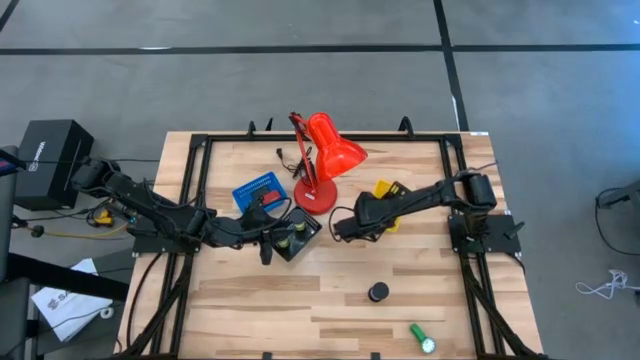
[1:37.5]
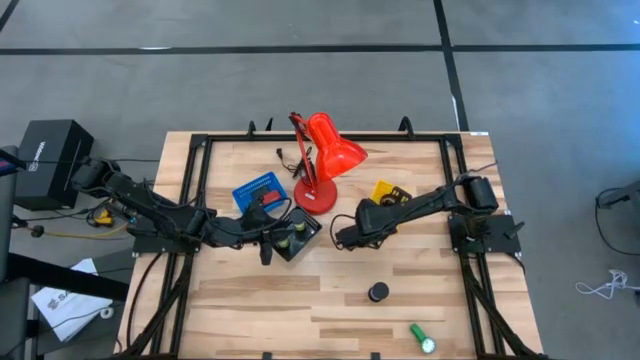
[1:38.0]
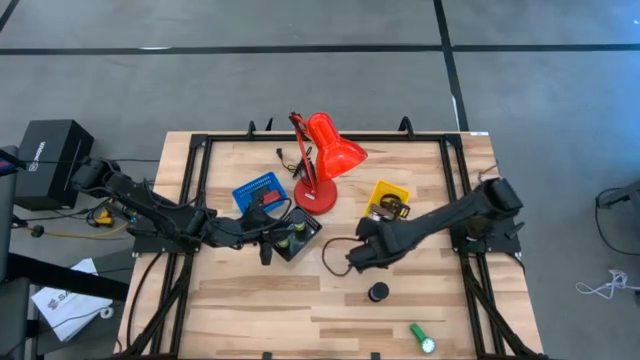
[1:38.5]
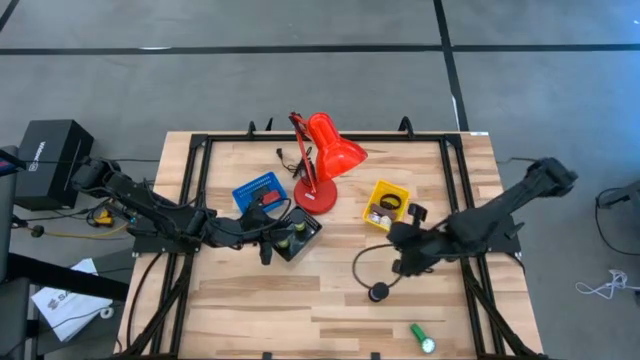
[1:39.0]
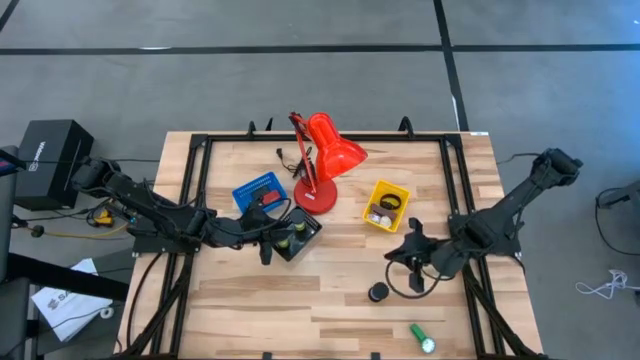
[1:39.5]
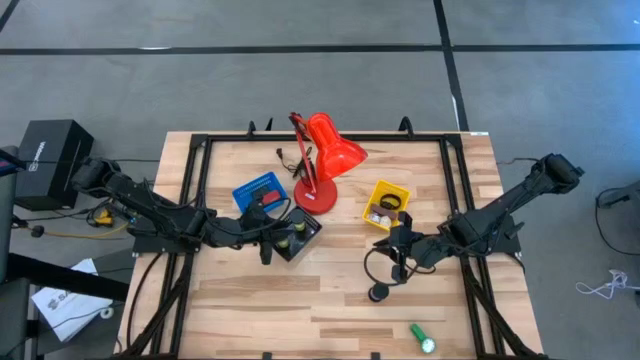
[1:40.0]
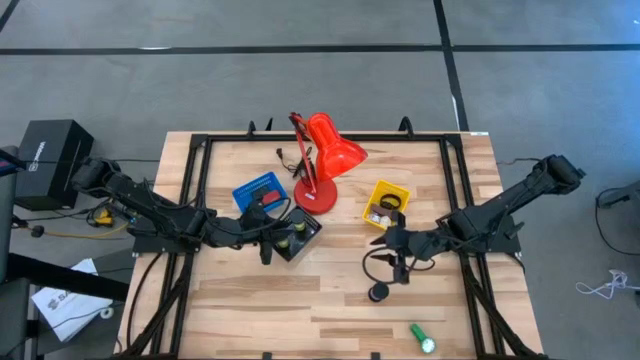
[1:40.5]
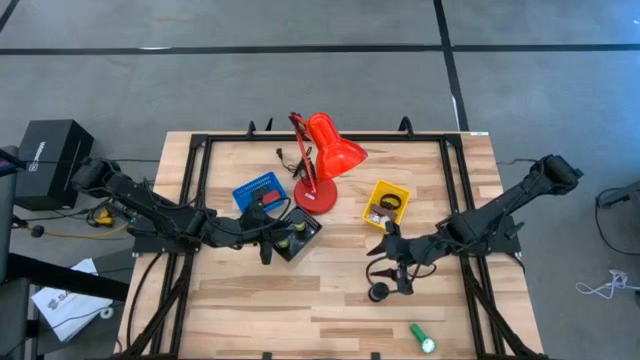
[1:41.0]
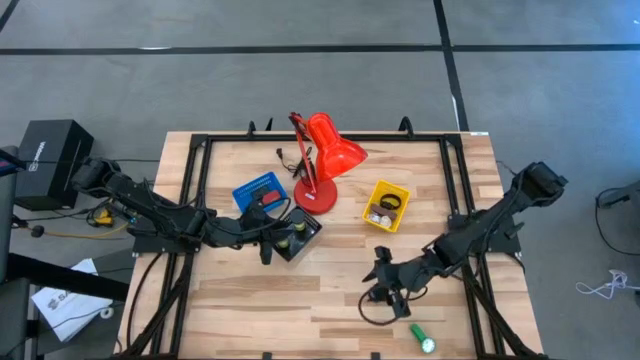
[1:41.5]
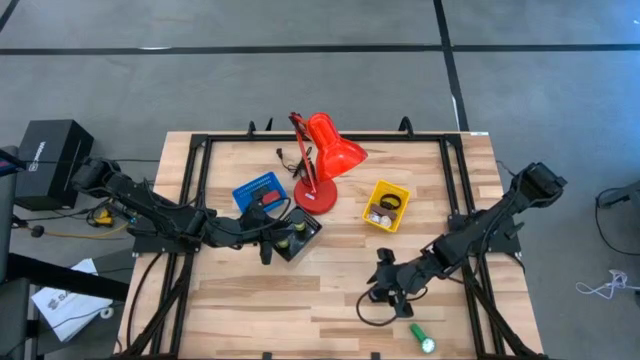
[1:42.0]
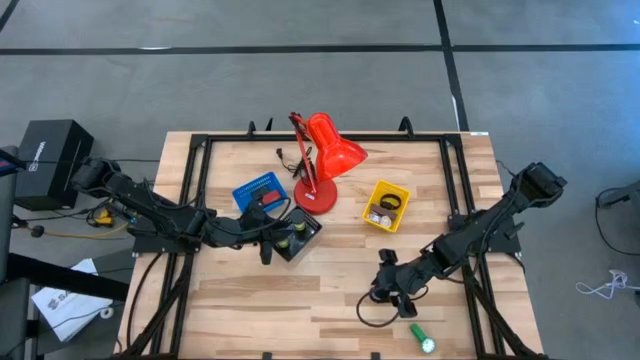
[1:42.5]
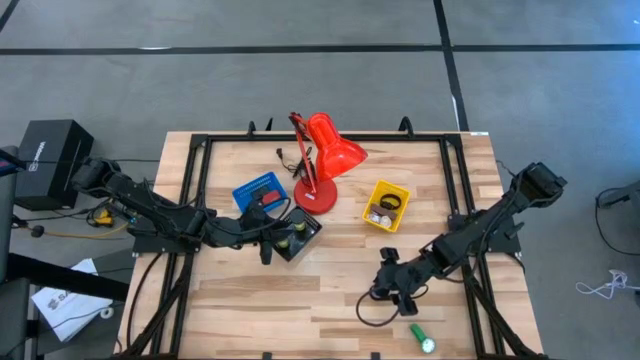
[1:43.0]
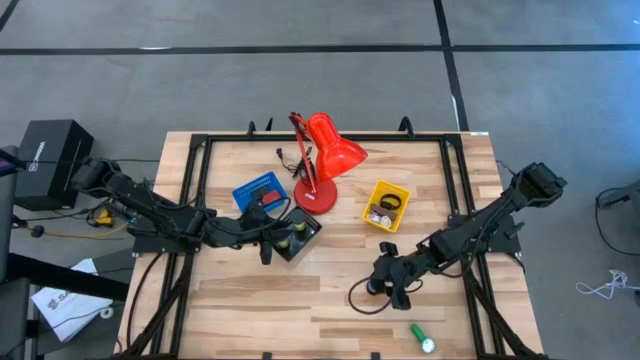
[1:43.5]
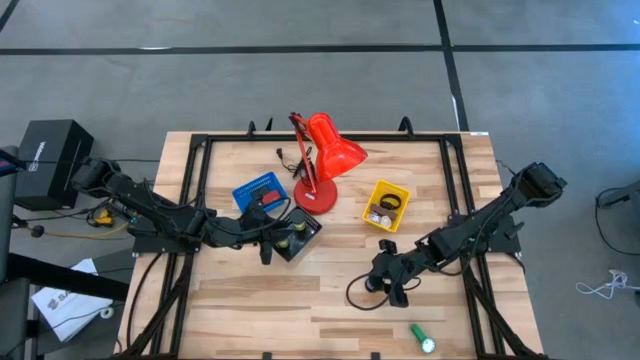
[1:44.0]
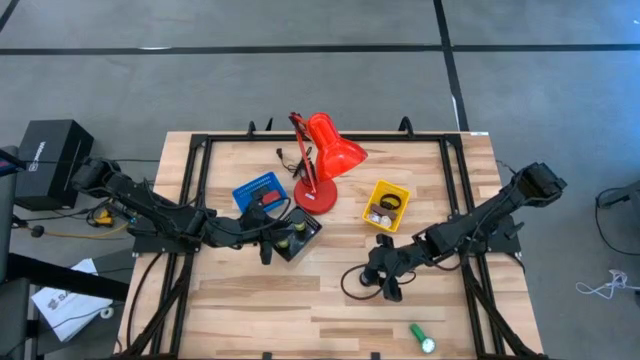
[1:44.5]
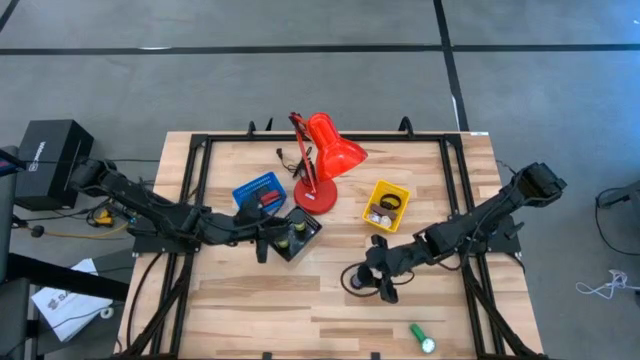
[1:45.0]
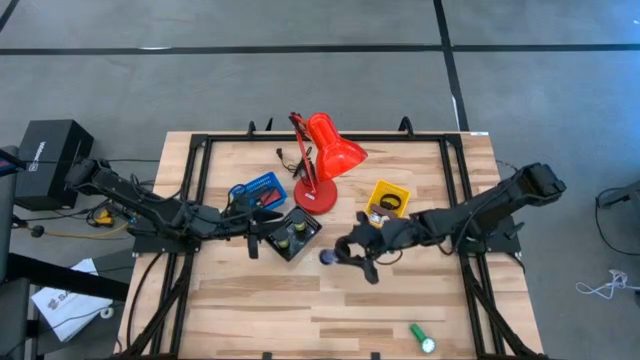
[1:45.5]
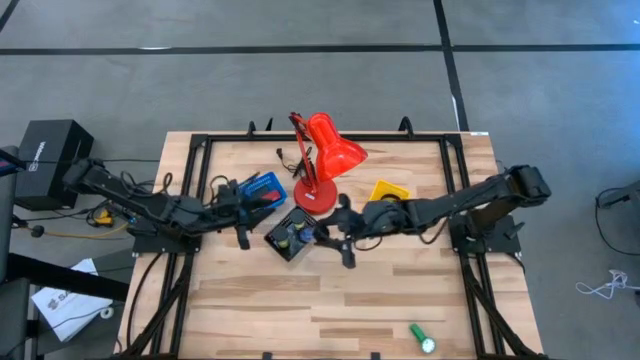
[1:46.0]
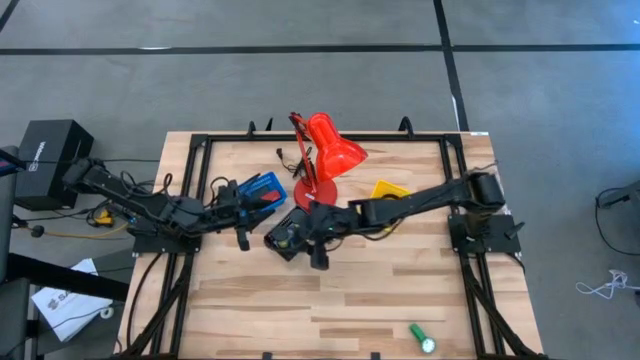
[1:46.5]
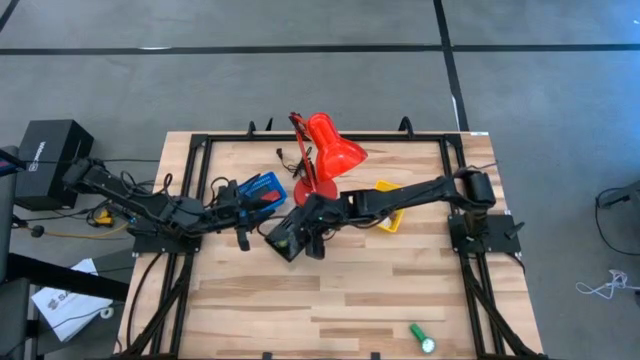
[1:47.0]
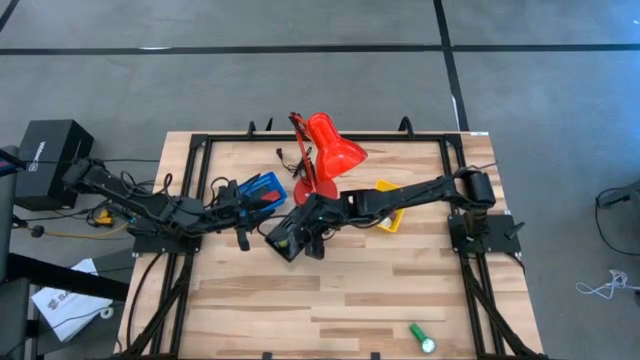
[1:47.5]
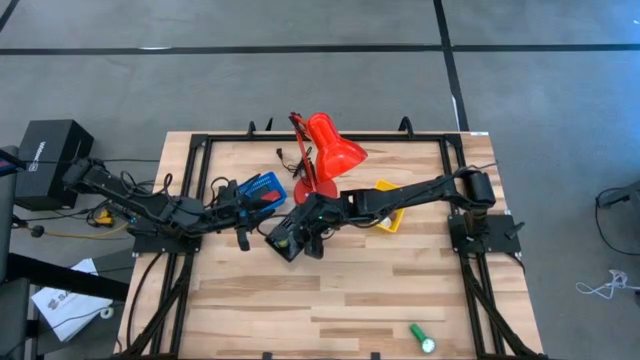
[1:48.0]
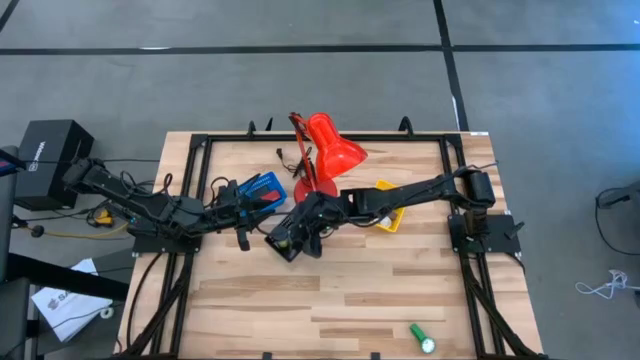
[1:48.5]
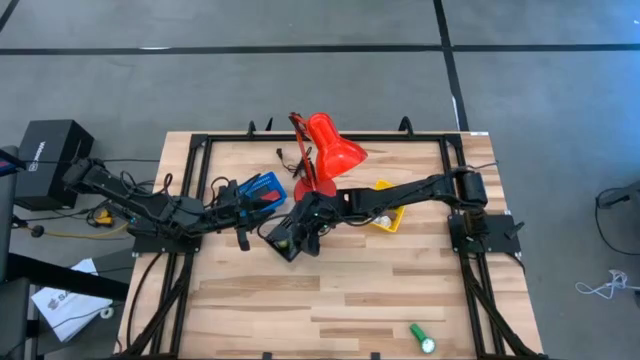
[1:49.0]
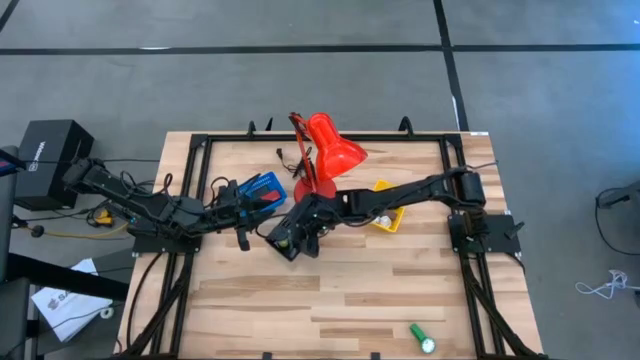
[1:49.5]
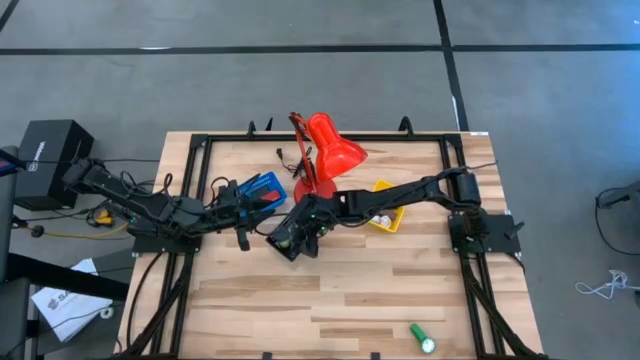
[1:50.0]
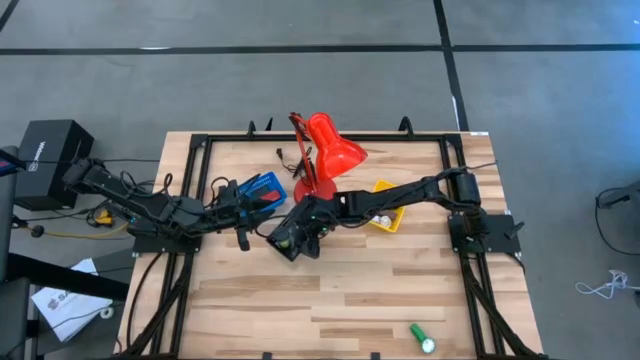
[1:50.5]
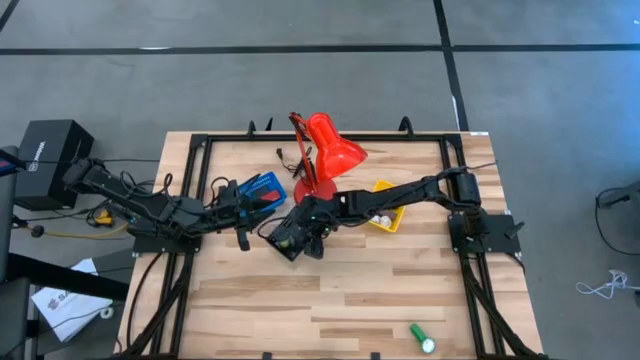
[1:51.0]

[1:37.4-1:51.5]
Task: Pick & Place Office items
Put the blue hourglass into the black bin

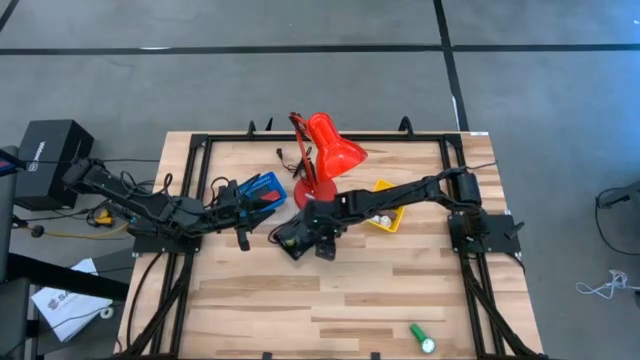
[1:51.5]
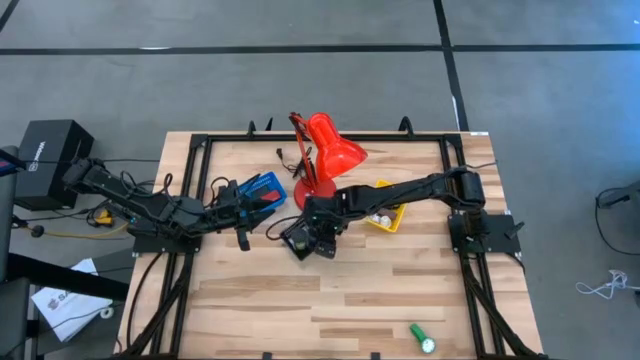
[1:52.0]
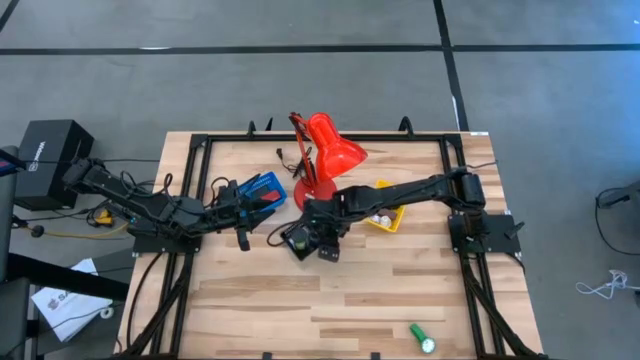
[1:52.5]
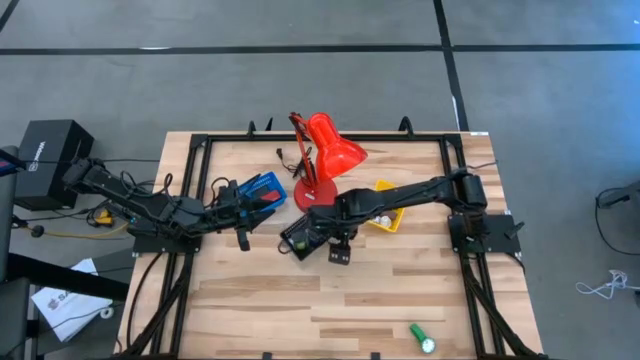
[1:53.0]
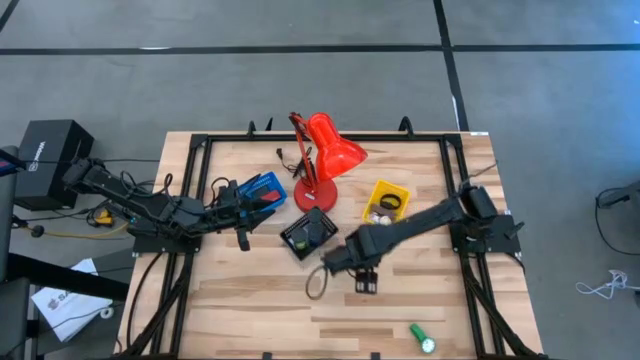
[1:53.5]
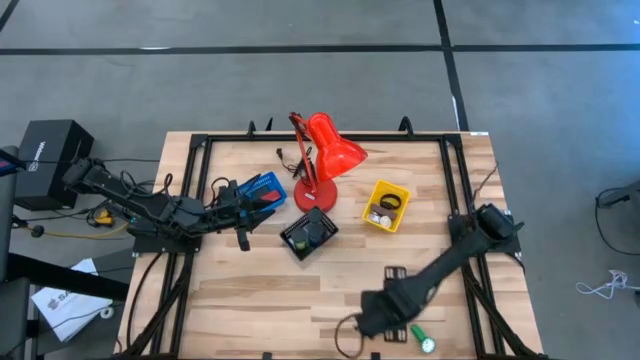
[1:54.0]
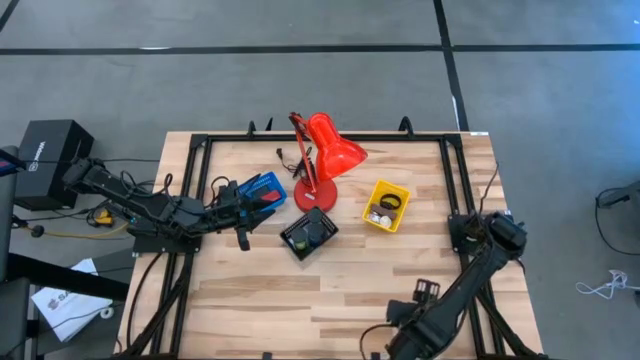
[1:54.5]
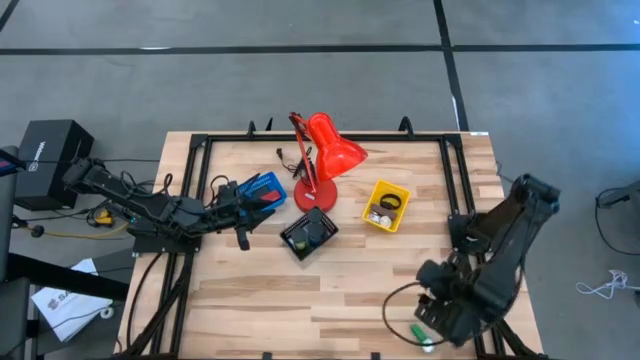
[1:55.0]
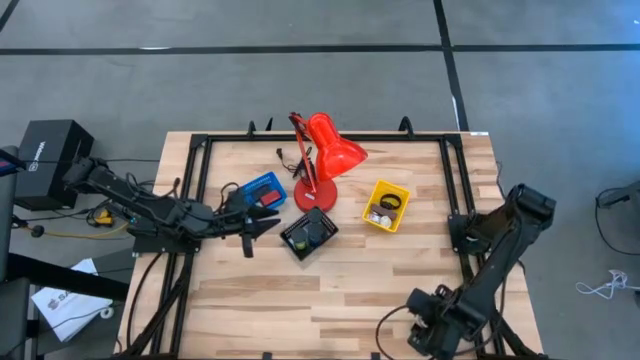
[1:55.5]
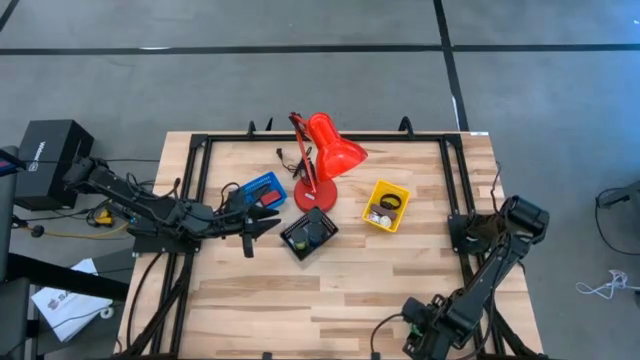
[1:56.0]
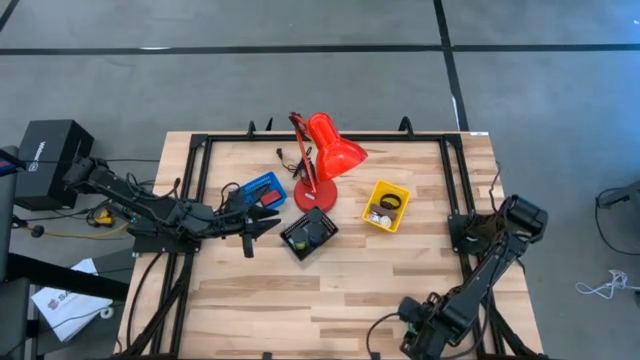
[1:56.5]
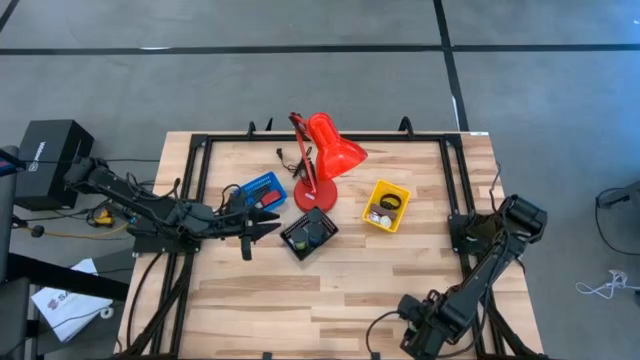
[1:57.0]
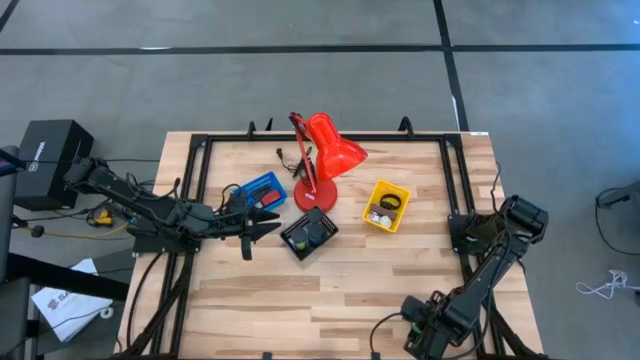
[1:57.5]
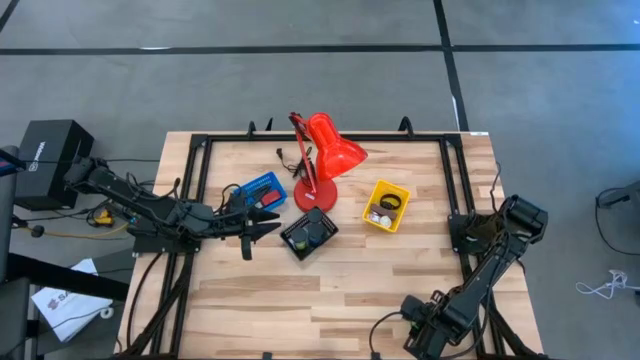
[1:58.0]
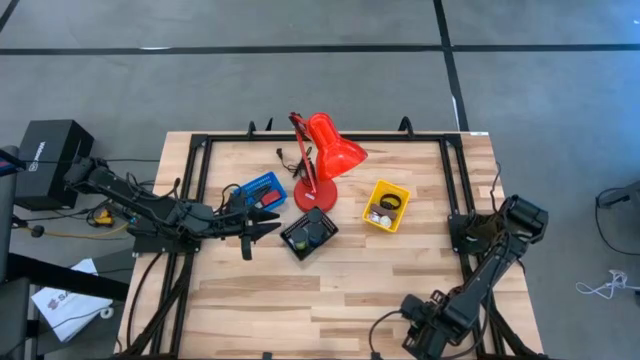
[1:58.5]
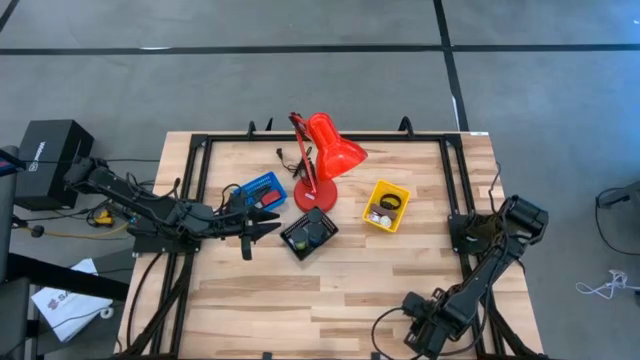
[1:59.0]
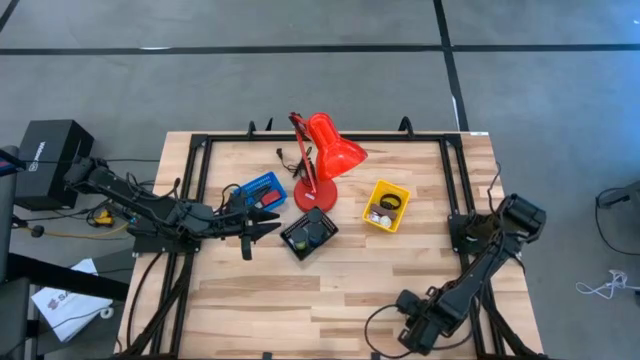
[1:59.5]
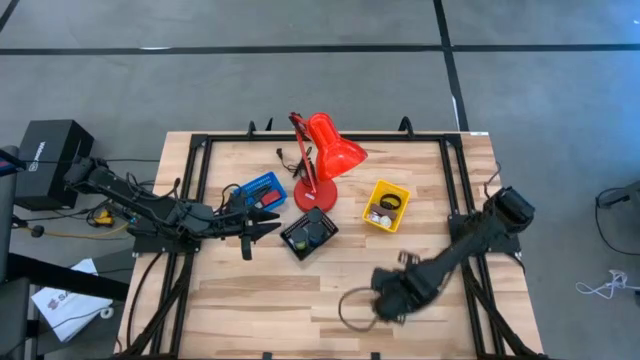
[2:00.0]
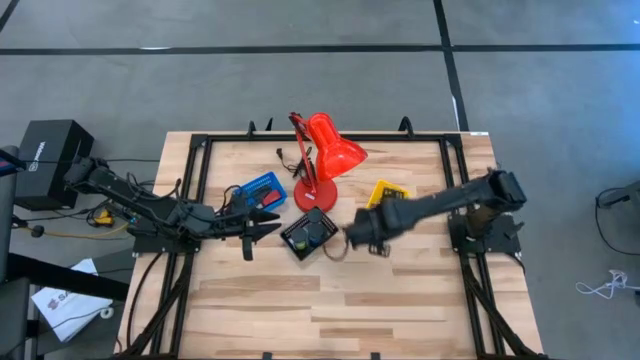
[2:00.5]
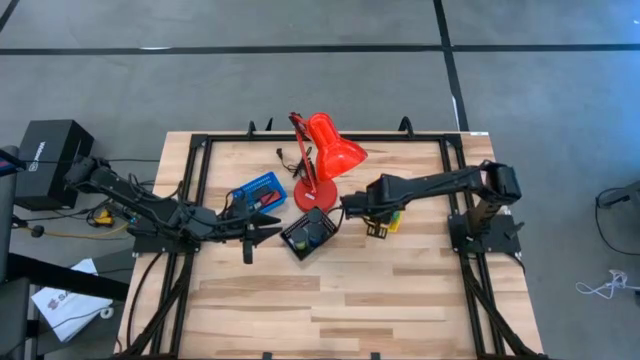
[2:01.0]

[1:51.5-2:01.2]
Put the green watch into the yellow bin
